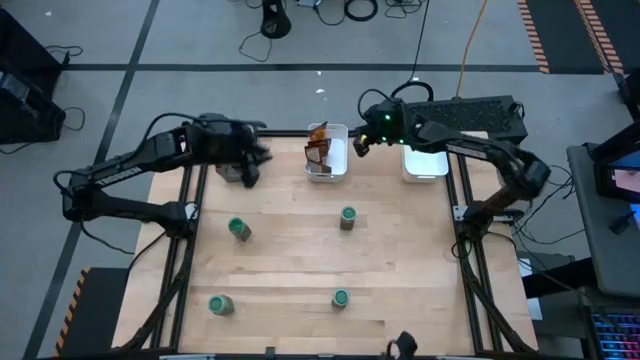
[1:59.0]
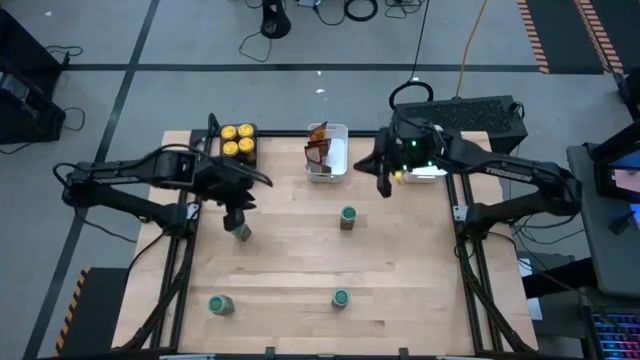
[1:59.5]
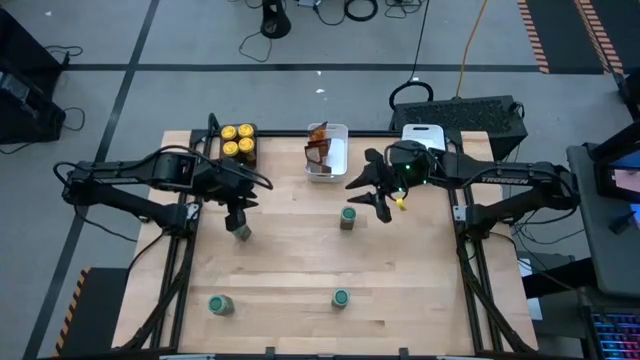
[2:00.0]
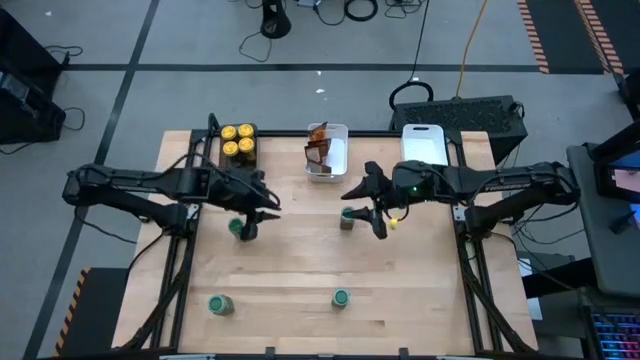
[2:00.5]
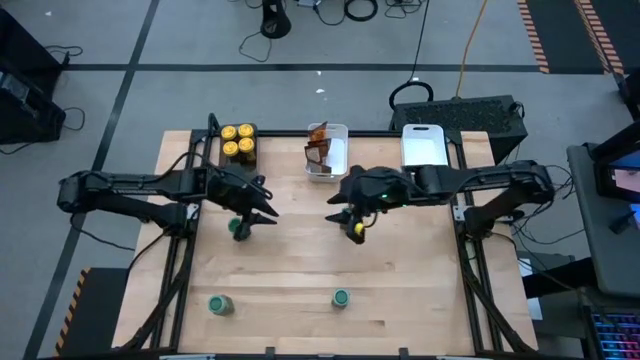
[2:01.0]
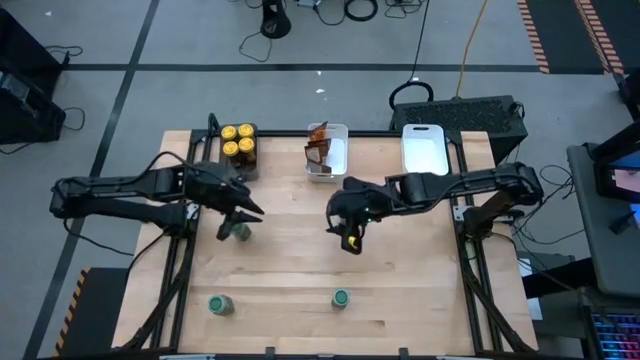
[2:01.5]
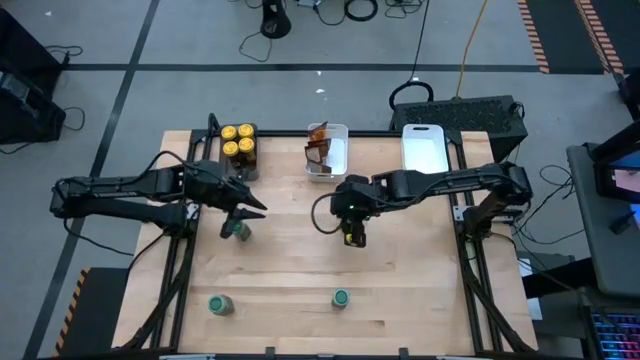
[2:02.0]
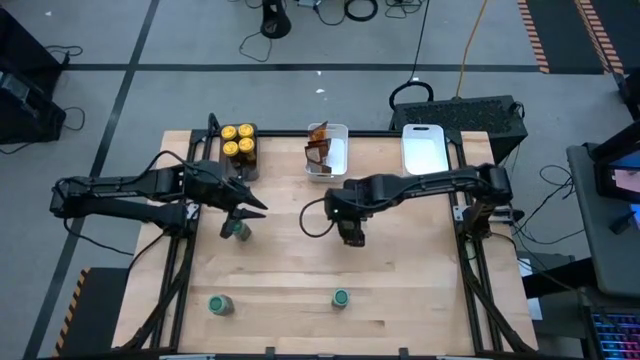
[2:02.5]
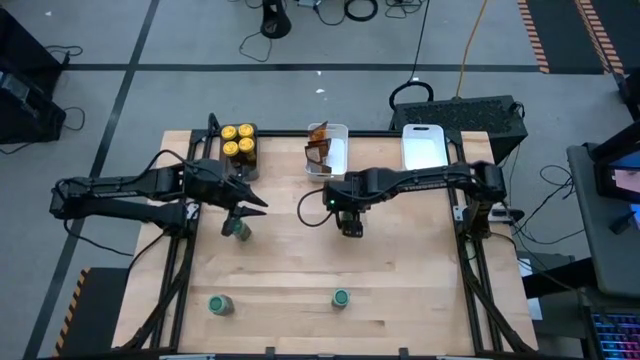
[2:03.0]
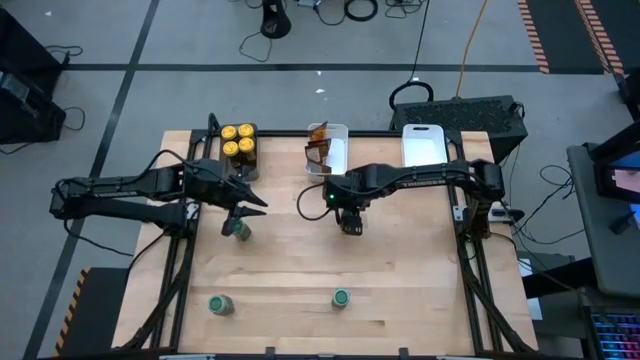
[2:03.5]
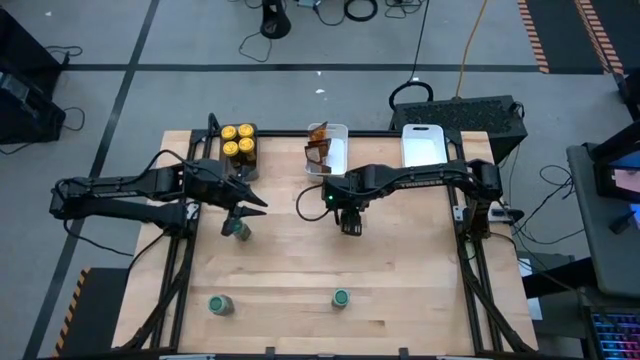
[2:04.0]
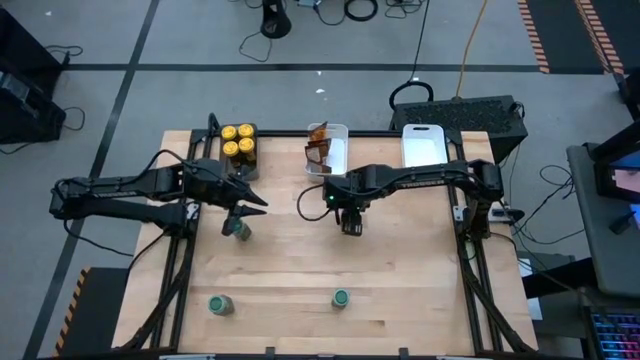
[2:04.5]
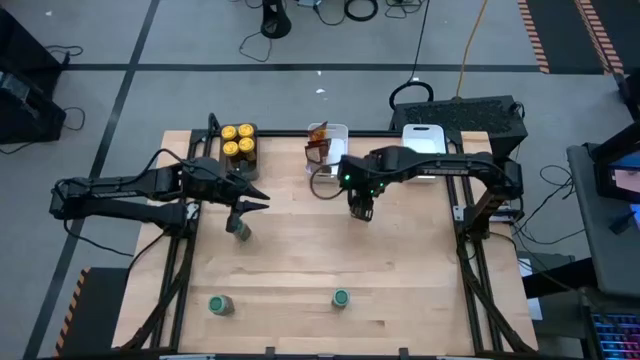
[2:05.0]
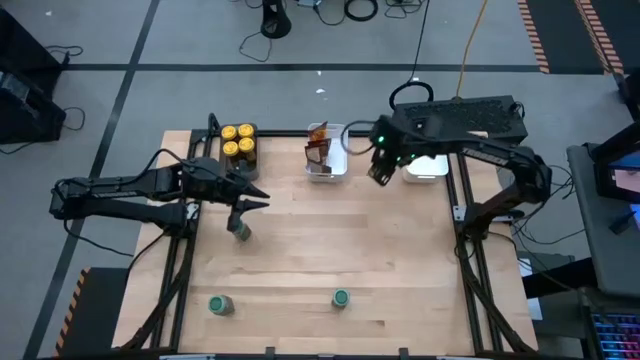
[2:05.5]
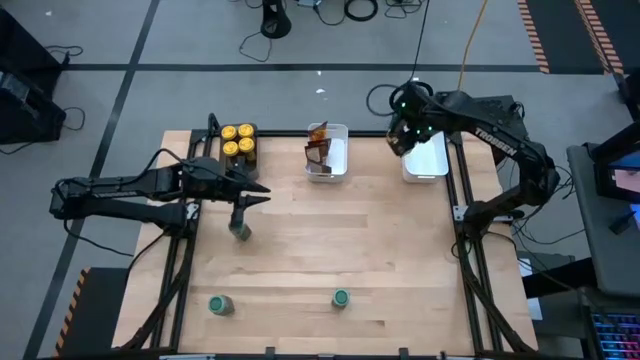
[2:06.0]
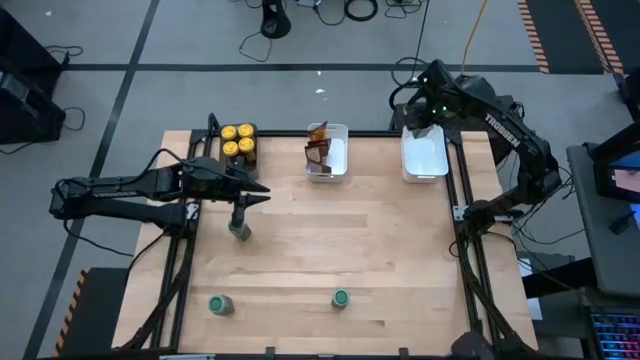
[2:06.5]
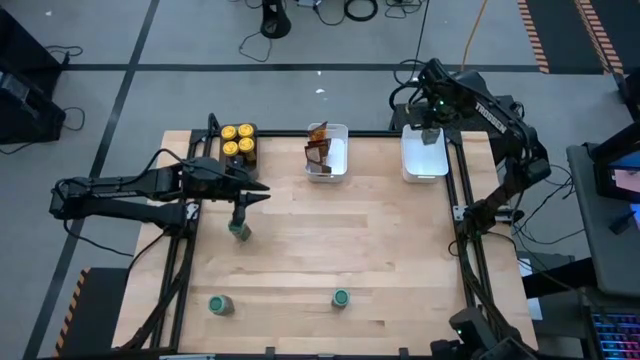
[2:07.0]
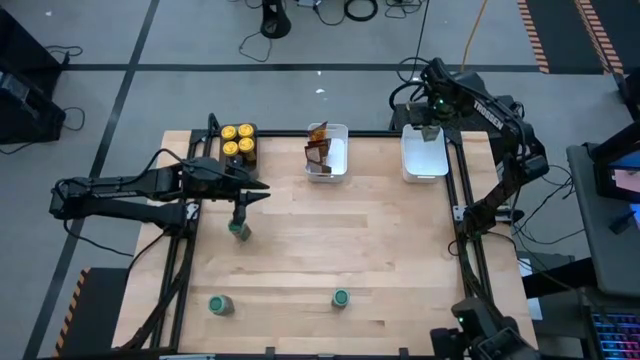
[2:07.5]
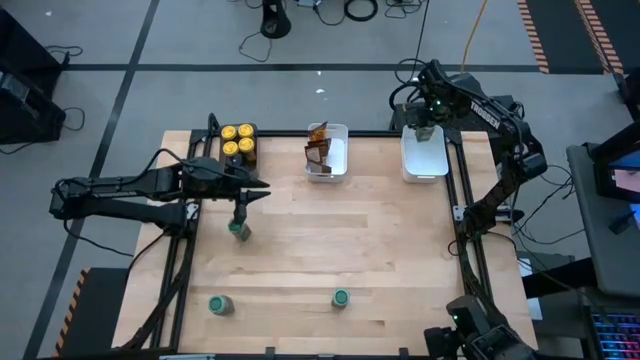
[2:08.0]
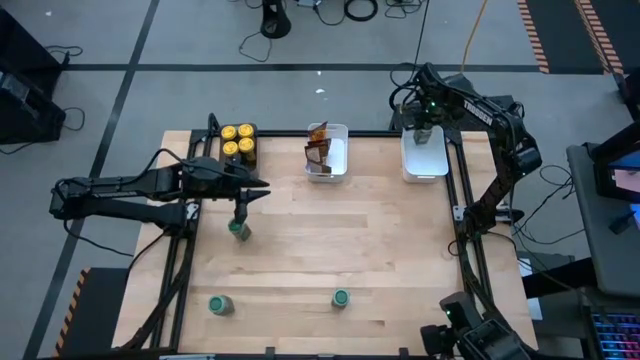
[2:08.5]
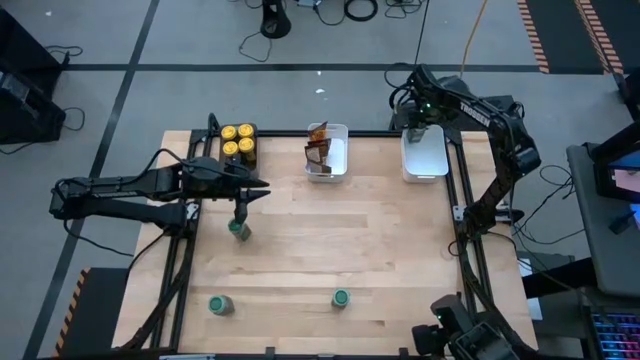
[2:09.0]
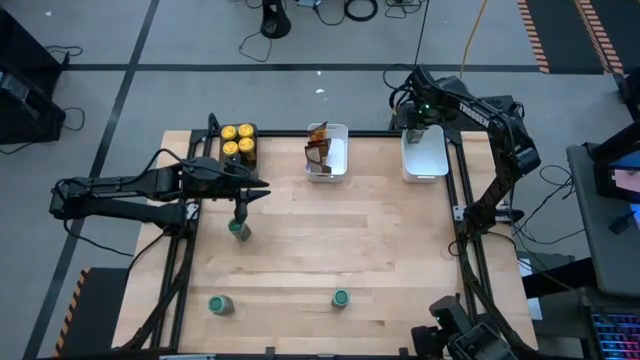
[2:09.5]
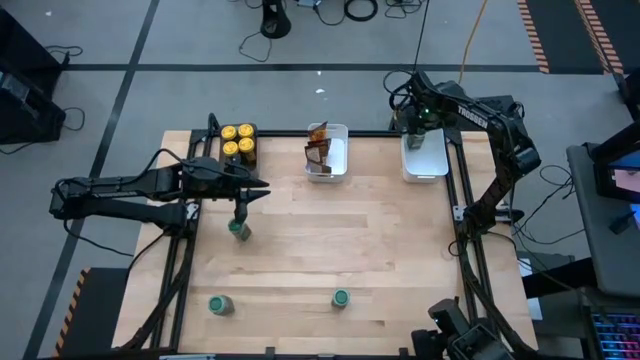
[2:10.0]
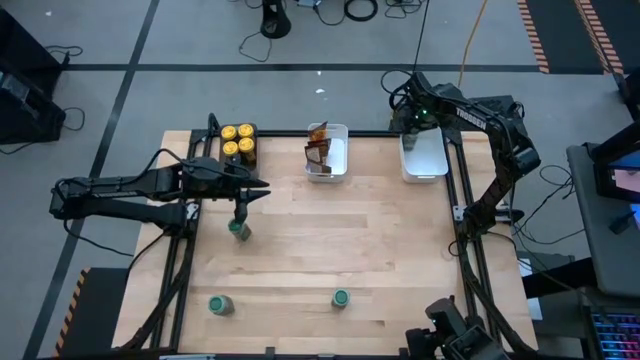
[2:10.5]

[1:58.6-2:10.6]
Task: Sort spices by type
Put the top right green seasoning bottle into the right white bin

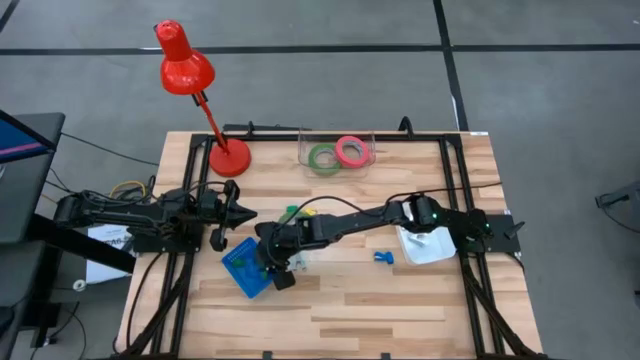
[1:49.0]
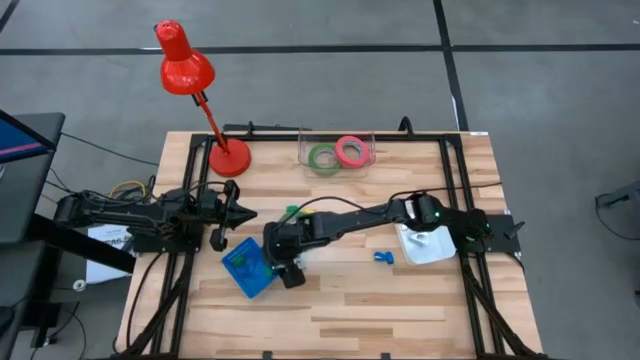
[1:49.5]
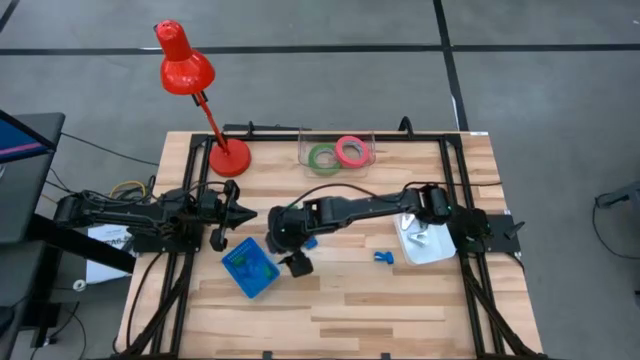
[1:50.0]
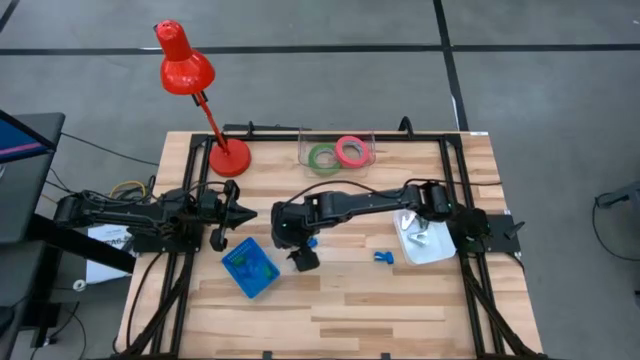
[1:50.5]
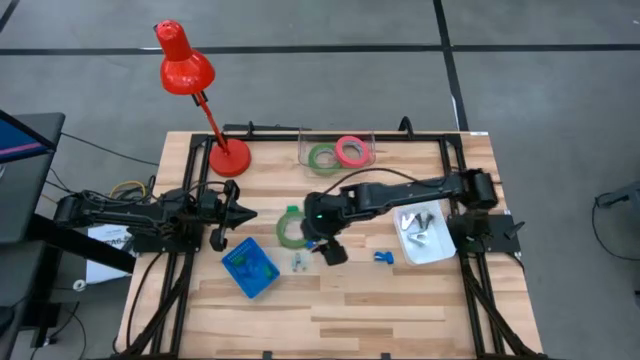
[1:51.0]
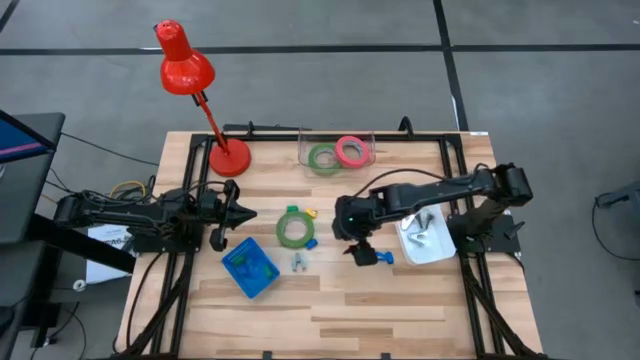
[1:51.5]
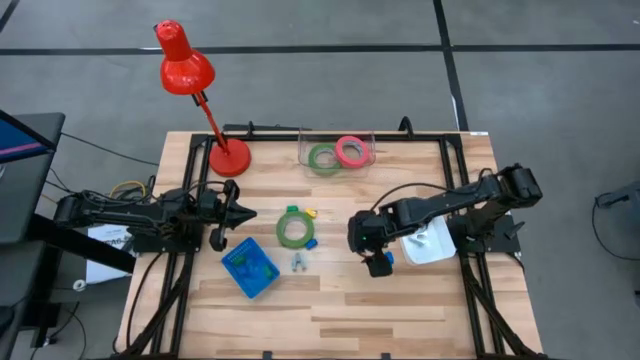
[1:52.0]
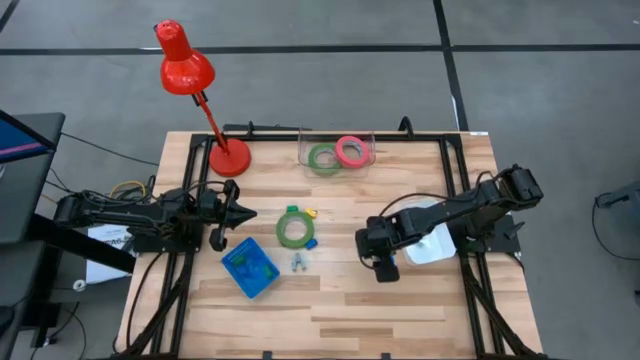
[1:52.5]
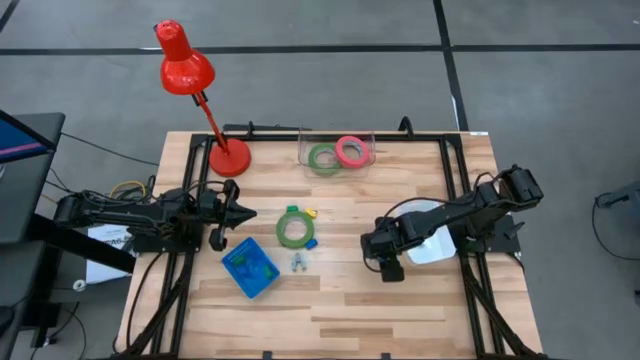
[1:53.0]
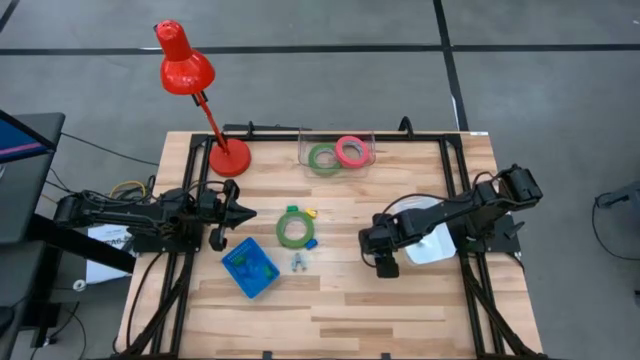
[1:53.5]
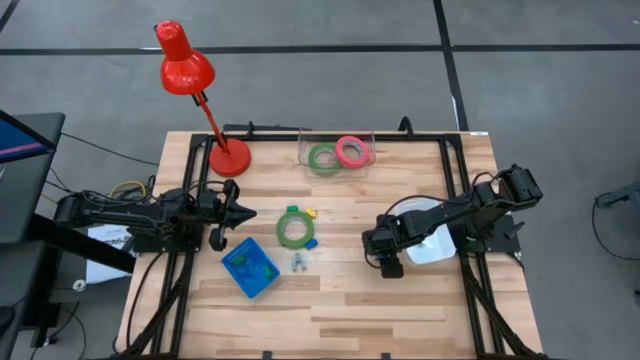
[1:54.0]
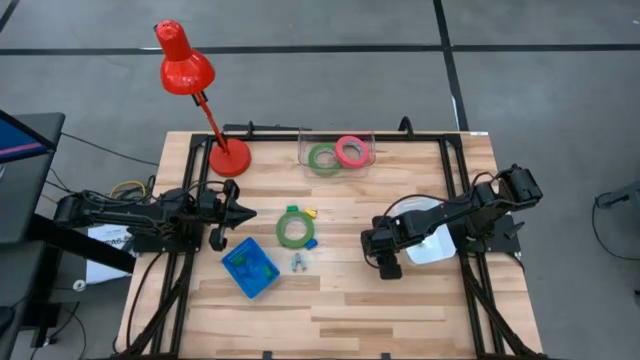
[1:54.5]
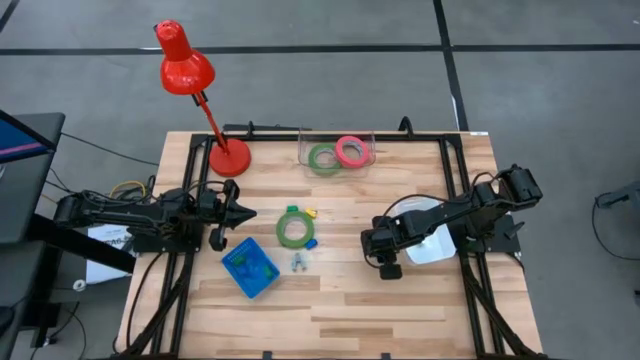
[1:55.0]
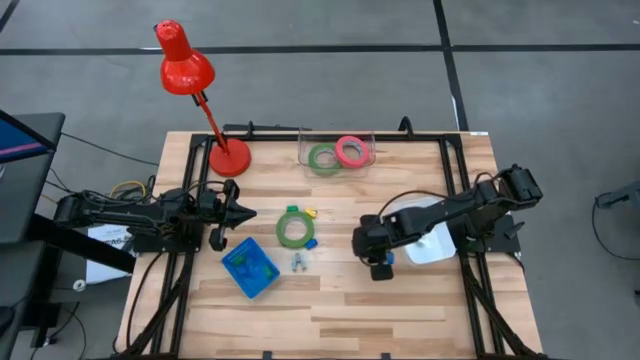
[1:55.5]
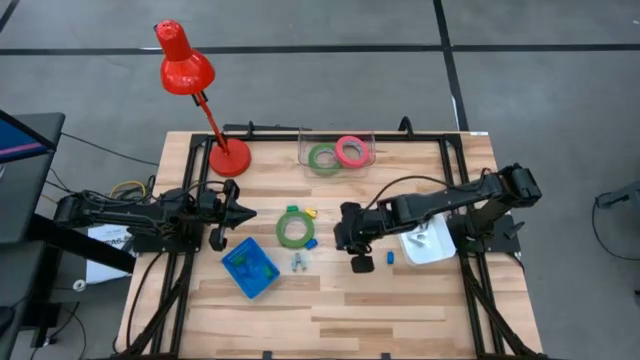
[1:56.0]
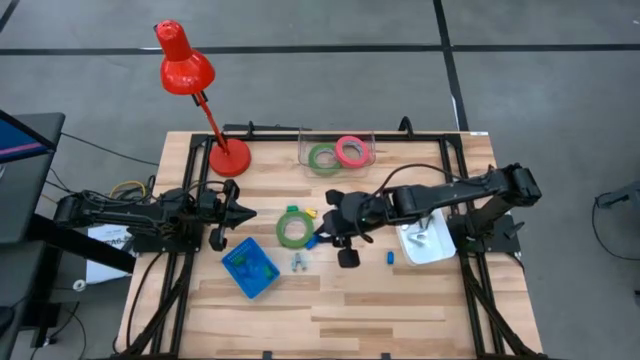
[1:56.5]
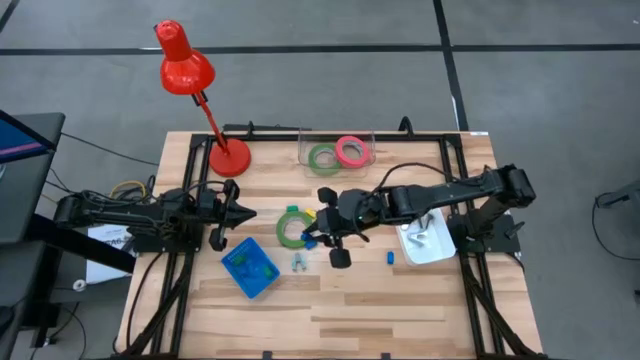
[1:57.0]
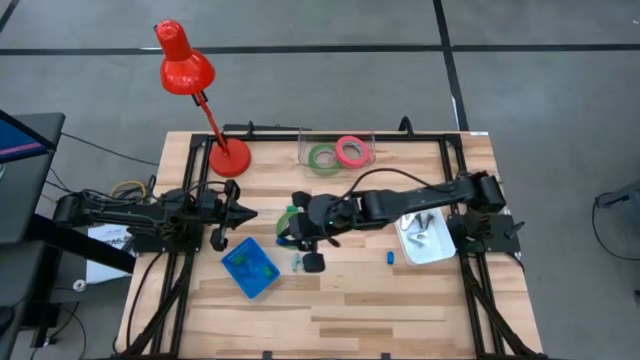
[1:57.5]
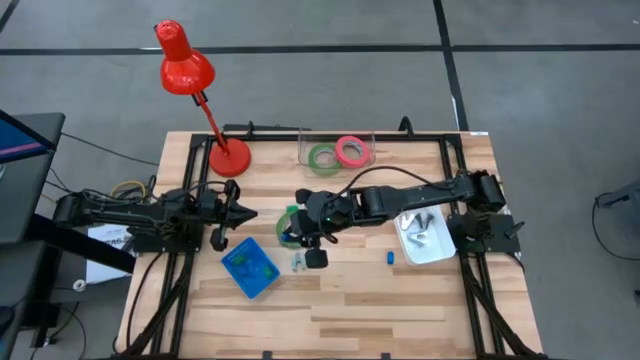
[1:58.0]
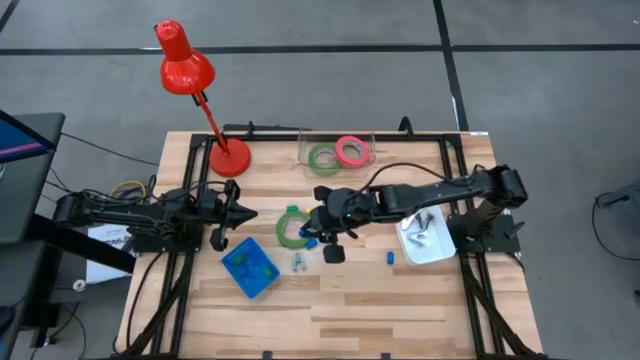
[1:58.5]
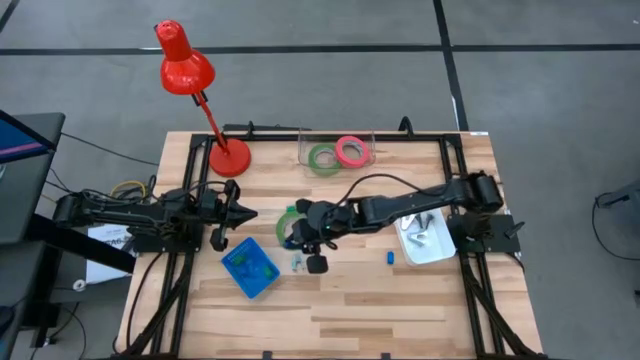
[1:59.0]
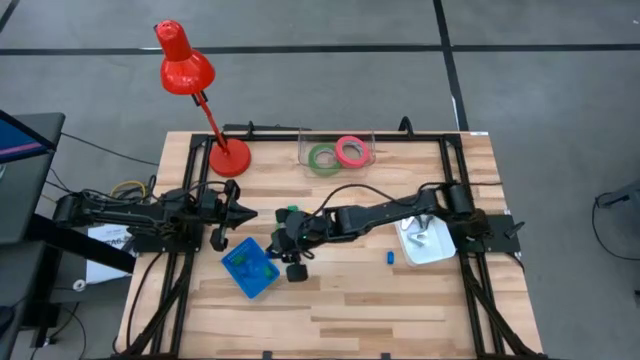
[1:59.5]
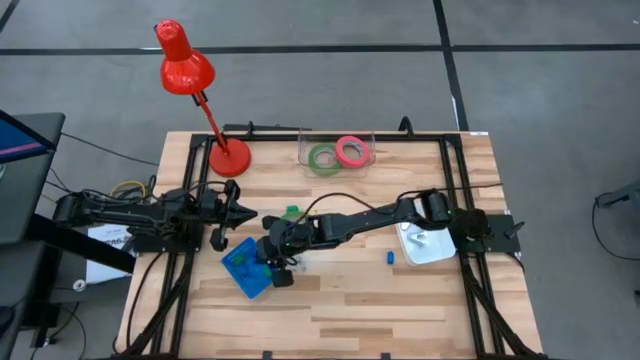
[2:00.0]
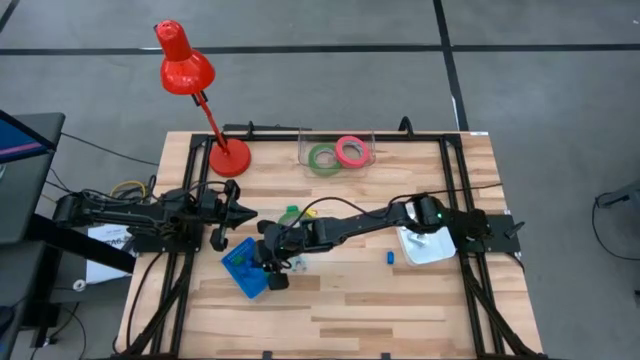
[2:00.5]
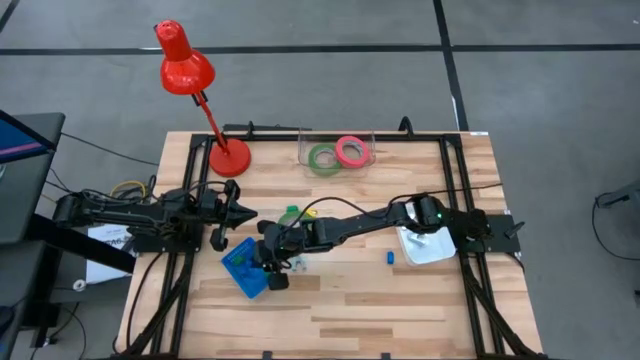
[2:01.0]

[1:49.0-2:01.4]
Task: Pick and place Stapler, Stapler remover, tape
Put the middle blue stapler into the blue bin
